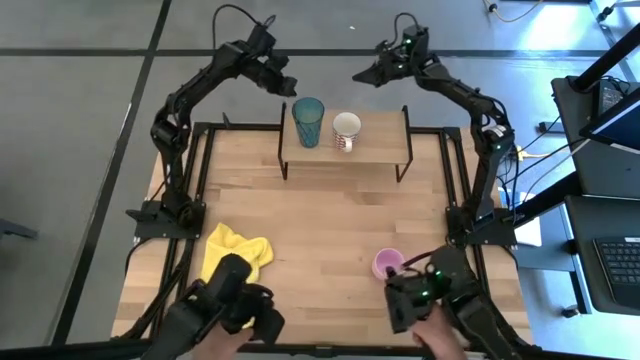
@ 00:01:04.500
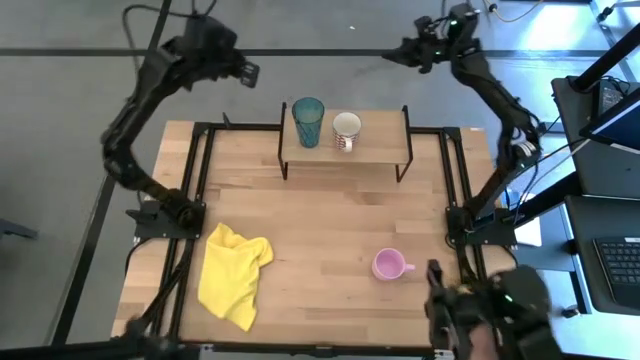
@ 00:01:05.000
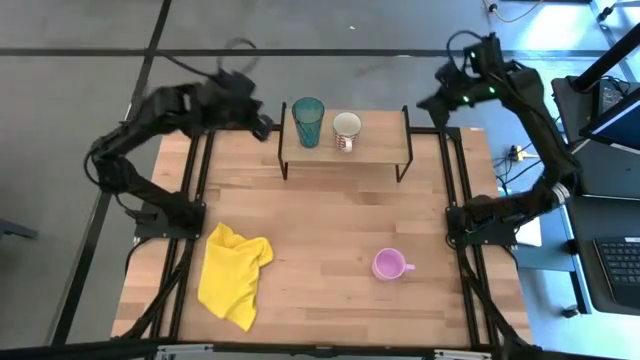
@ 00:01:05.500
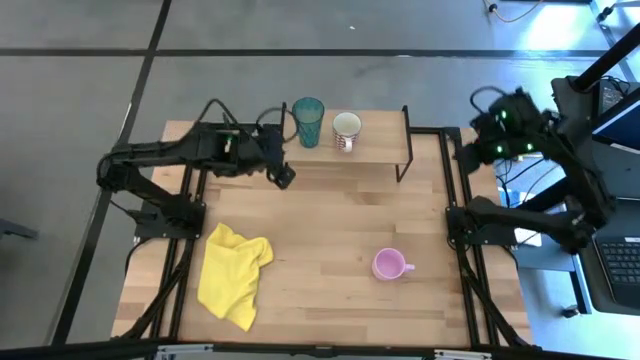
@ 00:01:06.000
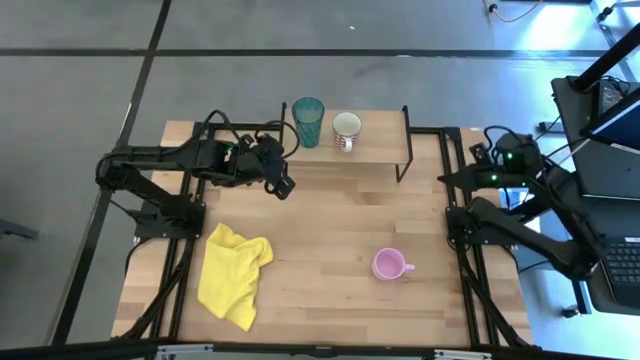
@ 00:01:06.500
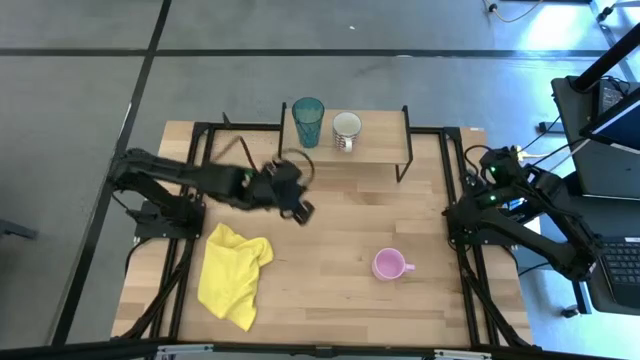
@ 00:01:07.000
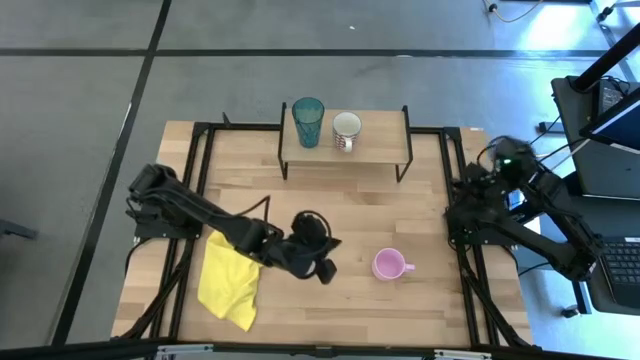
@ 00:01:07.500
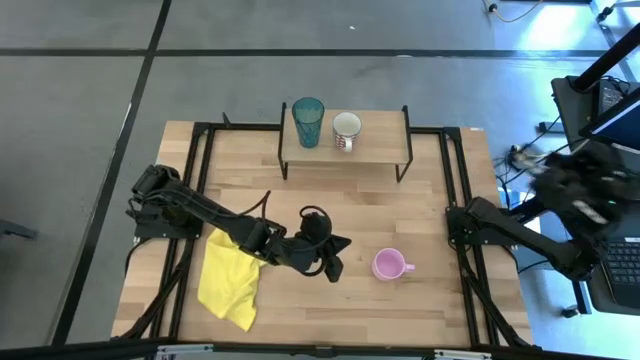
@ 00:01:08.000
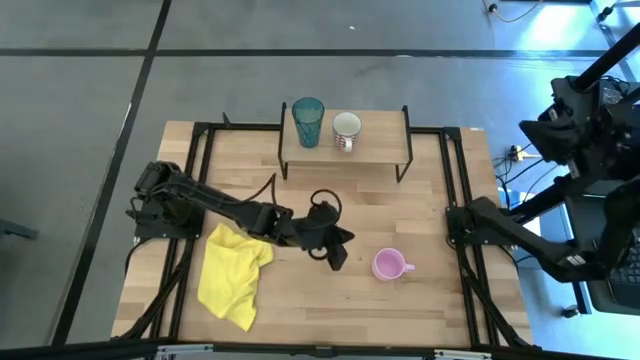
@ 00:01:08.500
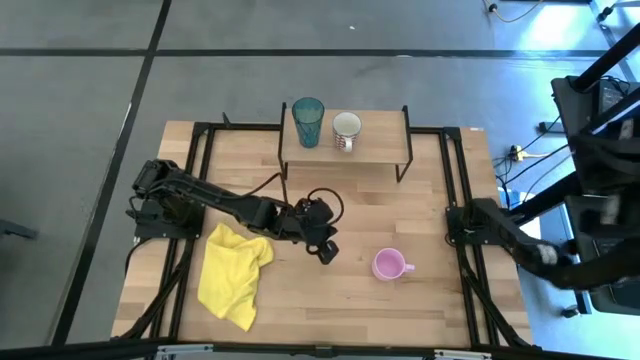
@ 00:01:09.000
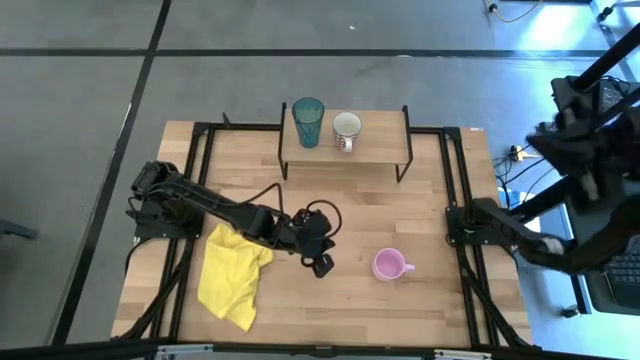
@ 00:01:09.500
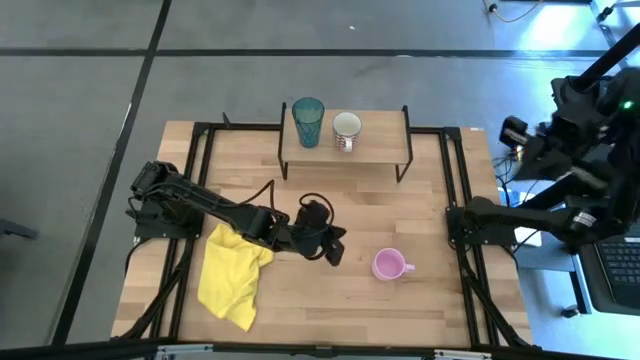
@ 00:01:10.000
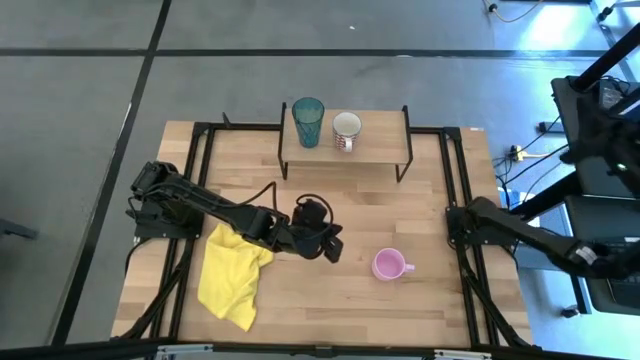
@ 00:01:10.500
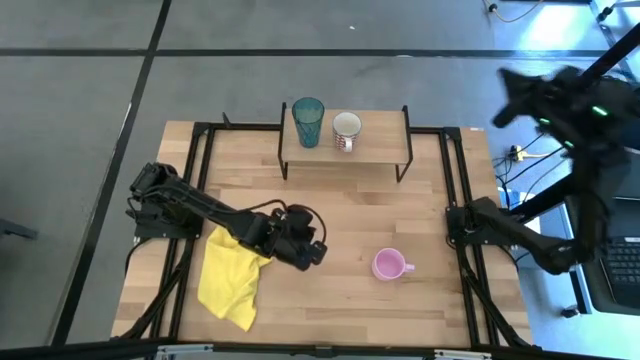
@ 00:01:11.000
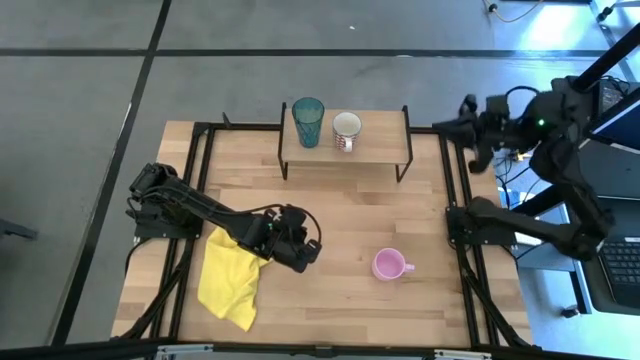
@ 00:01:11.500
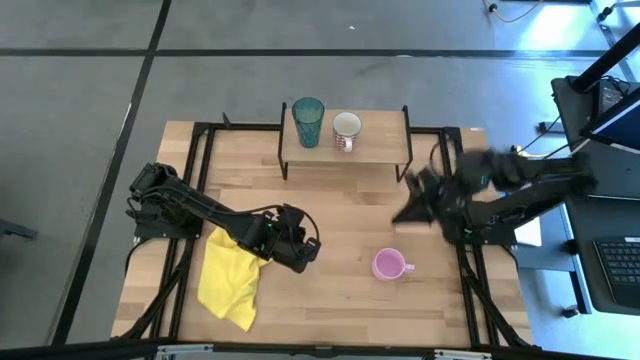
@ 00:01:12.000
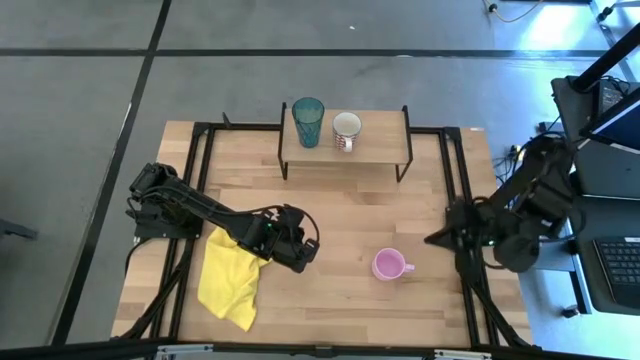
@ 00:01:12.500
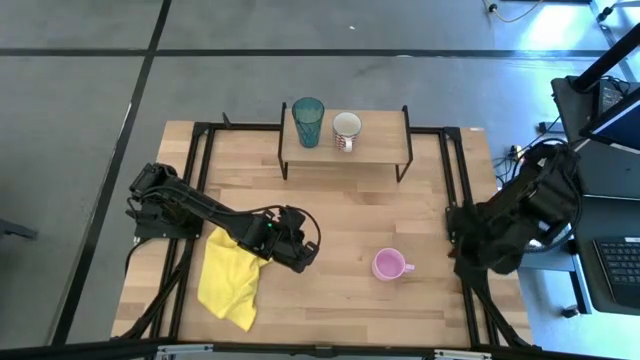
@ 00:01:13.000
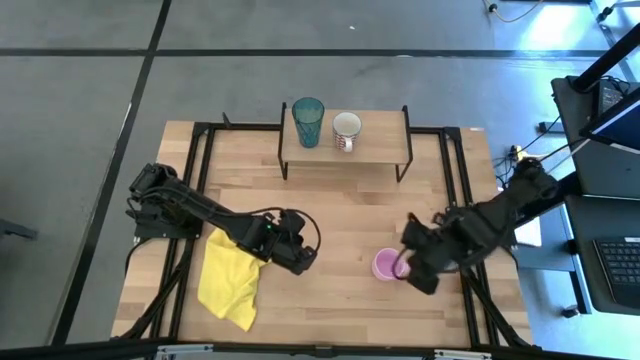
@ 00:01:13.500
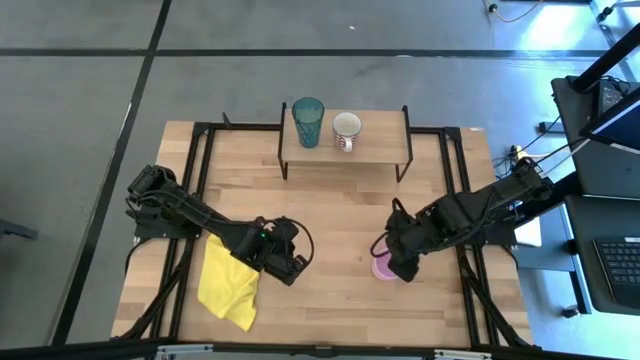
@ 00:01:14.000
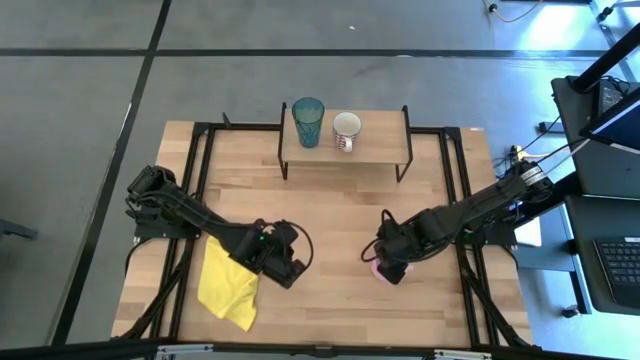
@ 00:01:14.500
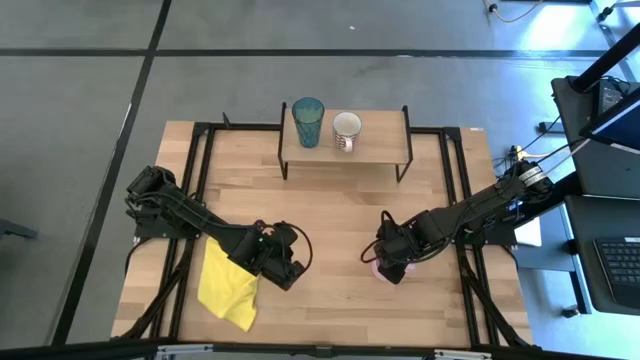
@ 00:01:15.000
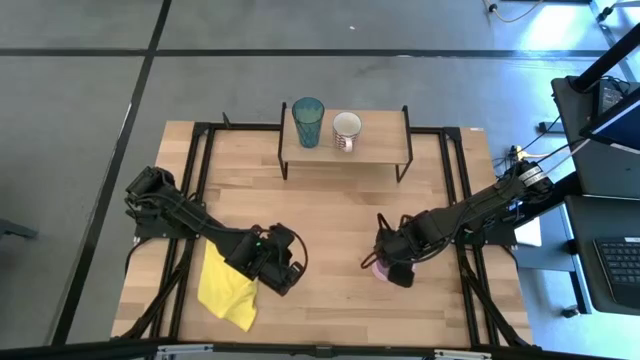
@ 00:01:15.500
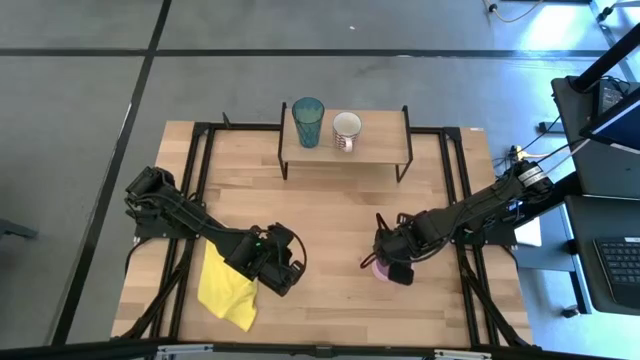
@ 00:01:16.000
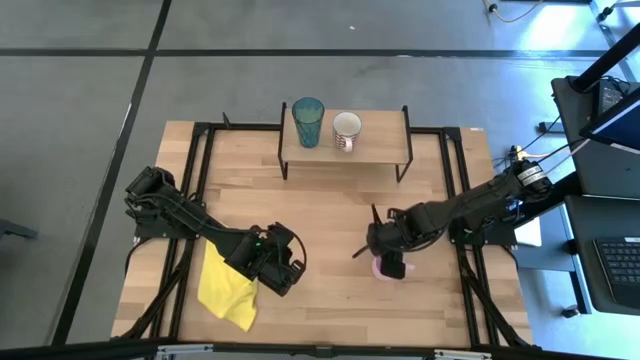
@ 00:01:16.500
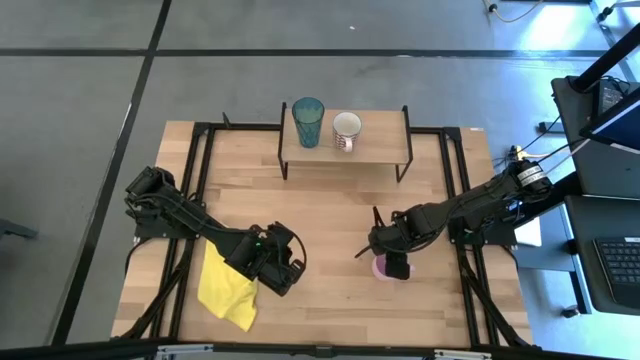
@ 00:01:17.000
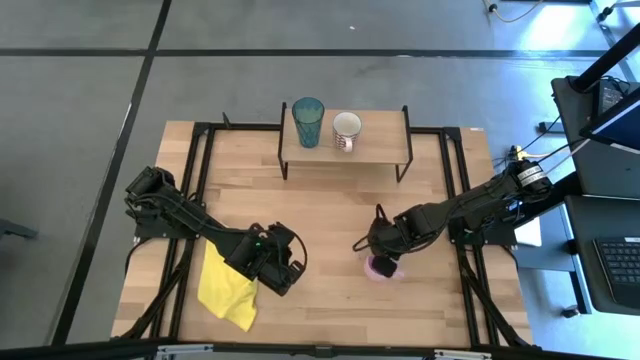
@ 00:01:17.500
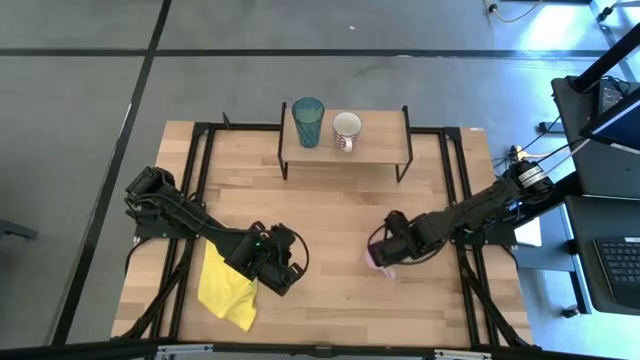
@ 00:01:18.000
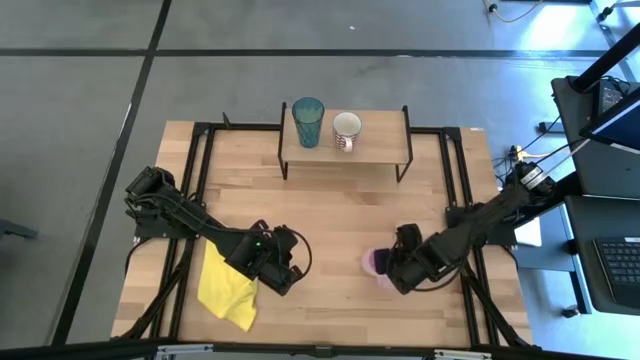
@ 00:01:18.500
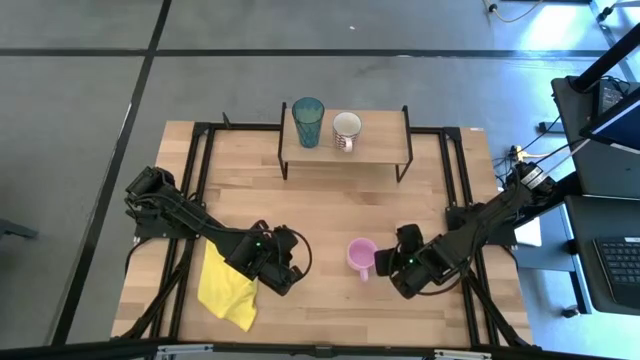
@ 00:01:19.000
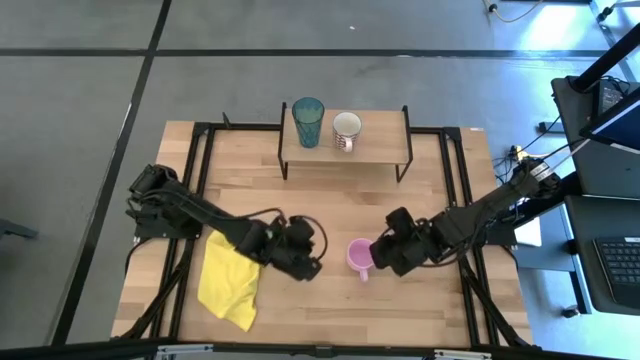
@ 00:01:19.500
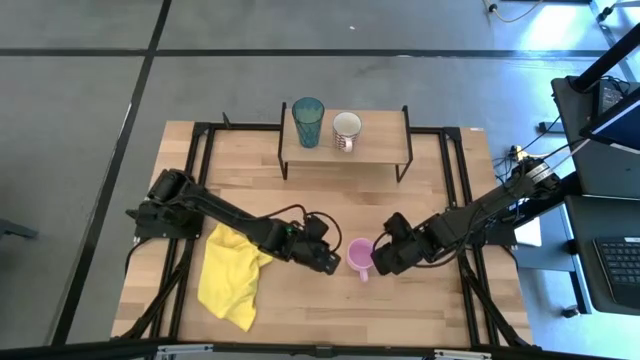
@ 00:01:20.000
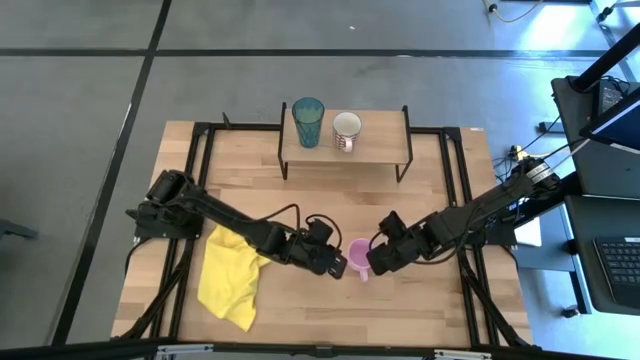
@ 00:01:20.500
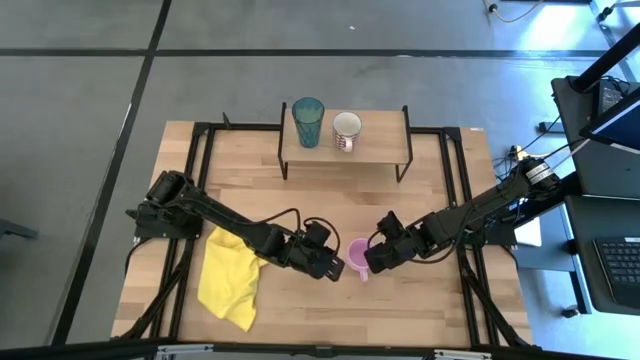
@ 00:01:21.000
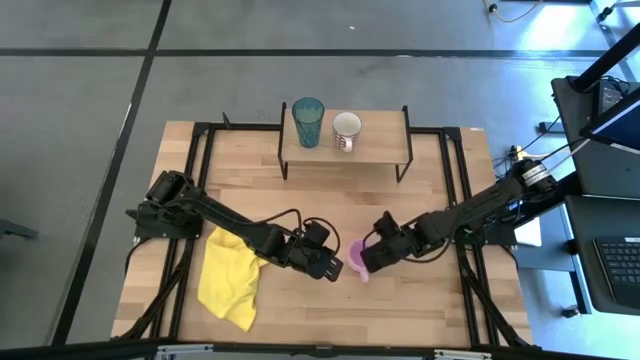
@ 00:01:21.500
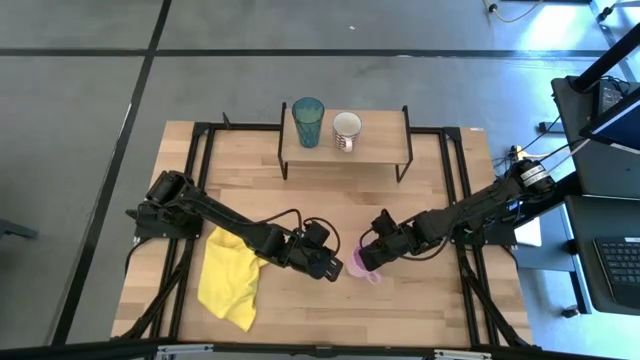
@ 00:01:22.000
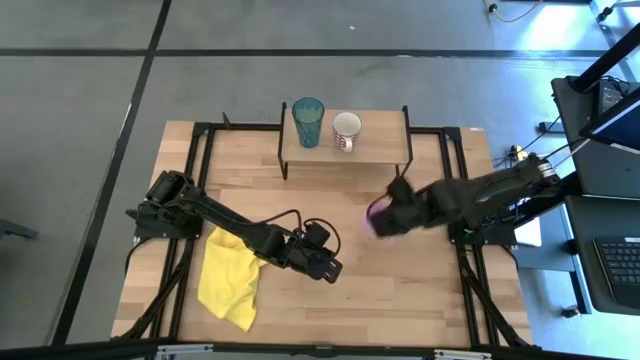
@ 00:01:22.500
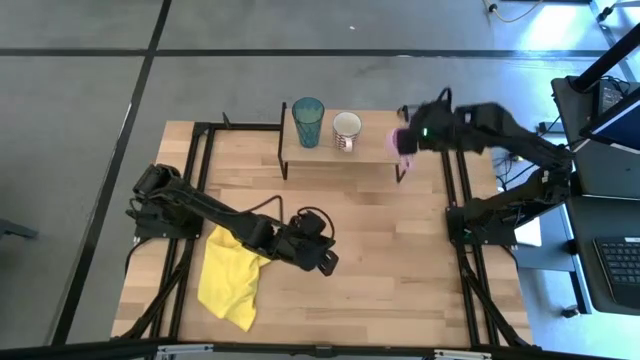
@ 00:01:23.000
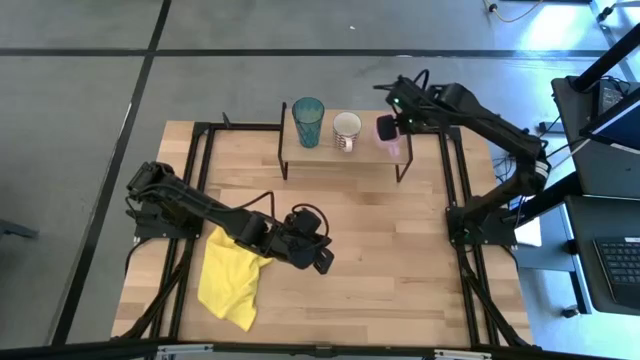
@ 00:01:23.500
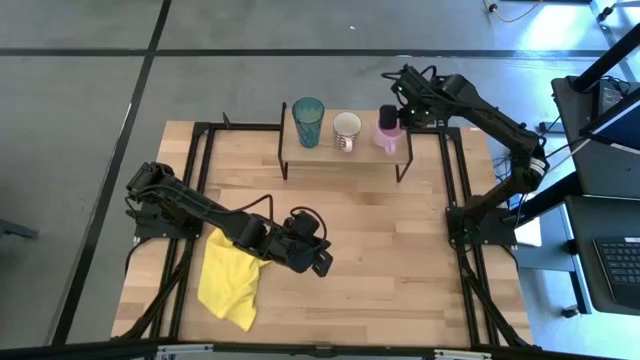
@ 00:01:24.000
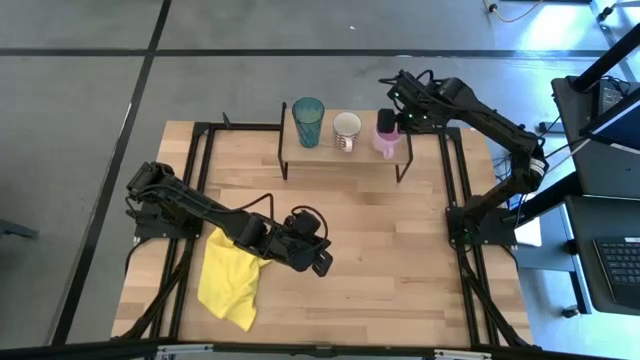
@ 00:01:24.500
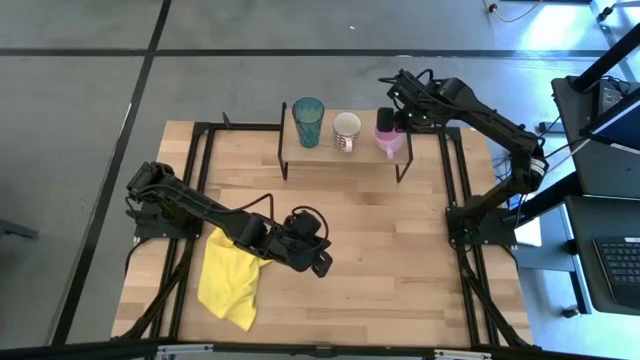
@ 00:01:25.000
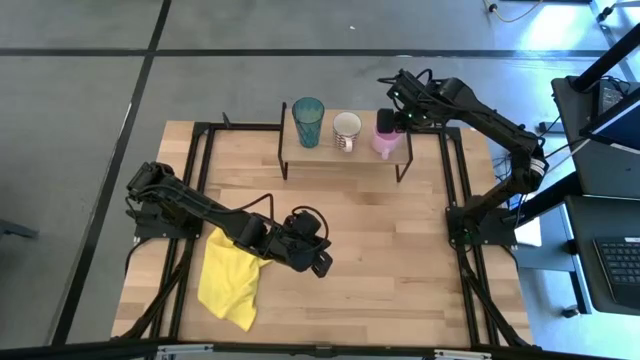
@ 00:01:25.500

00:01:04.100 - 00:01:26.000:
Task: Stack small to large cups/mugs on shelf
Put the pink cup on the shelf
